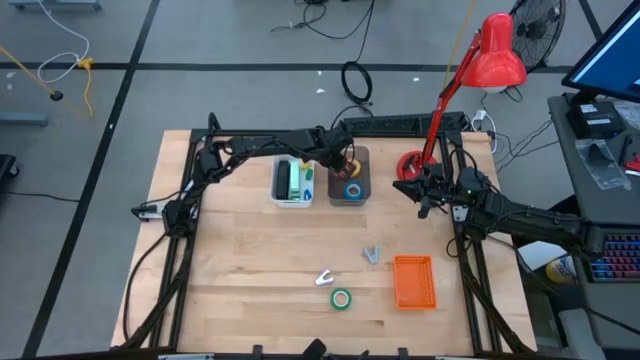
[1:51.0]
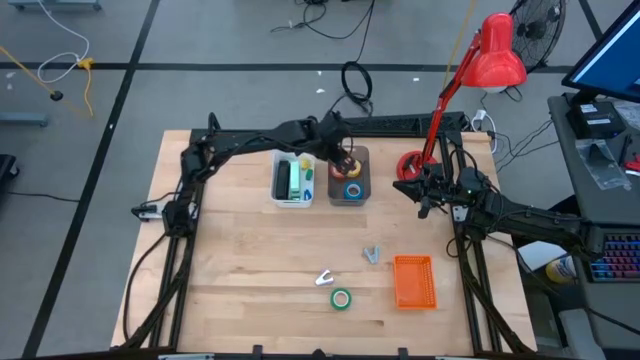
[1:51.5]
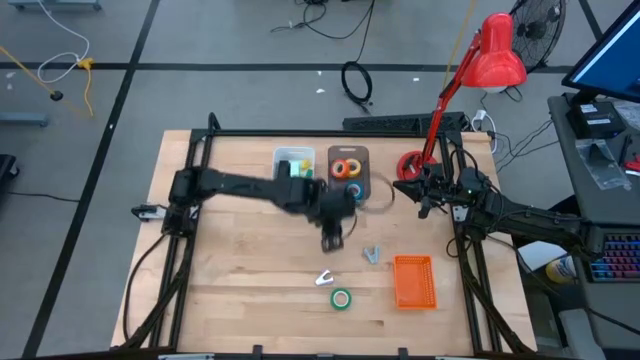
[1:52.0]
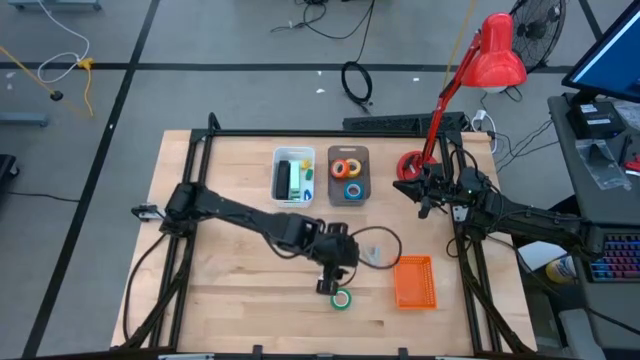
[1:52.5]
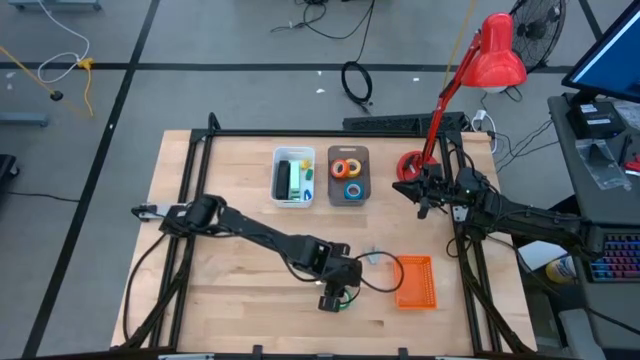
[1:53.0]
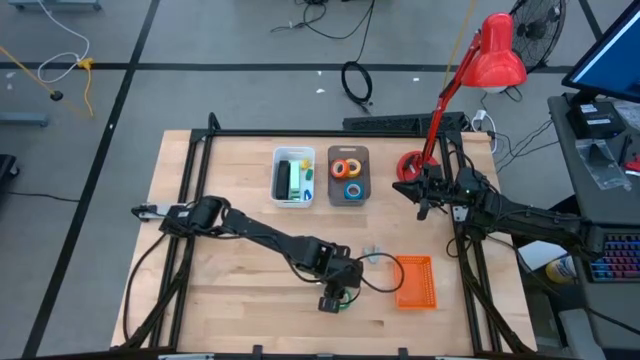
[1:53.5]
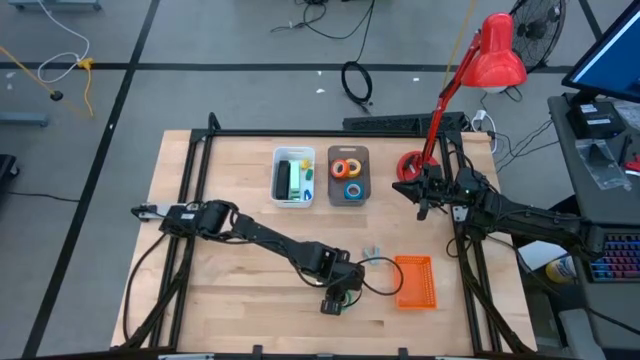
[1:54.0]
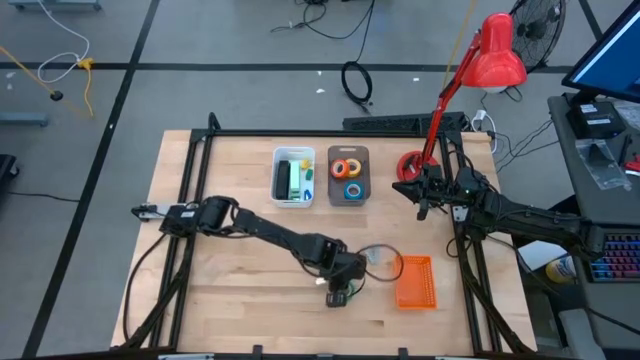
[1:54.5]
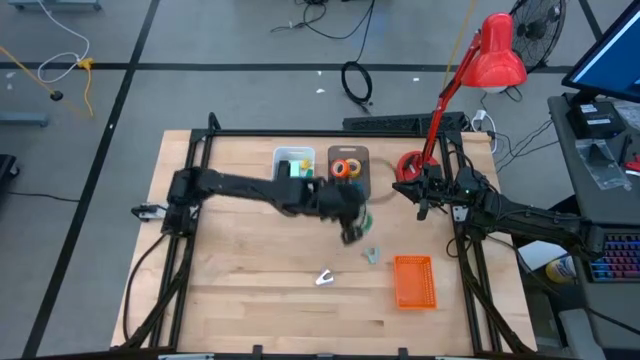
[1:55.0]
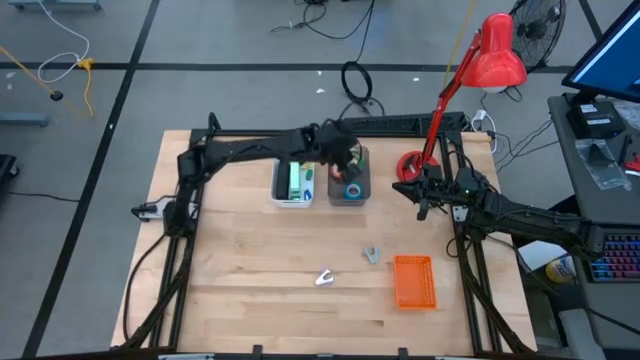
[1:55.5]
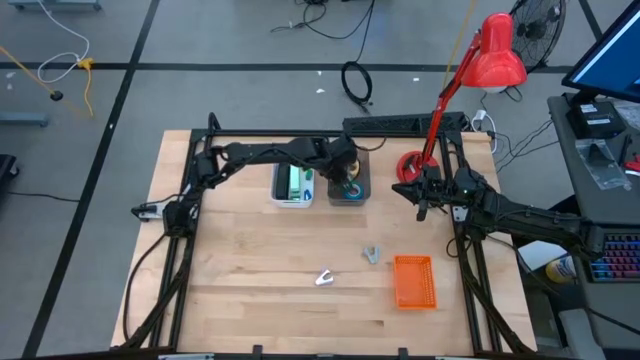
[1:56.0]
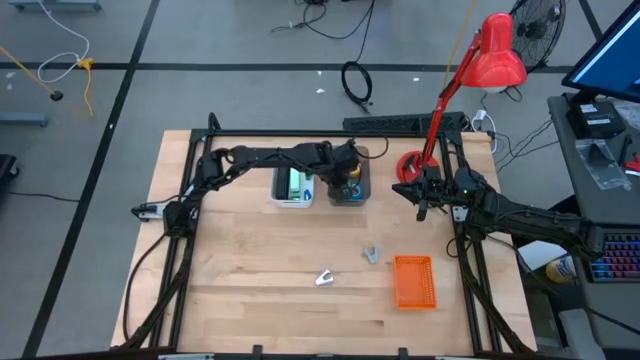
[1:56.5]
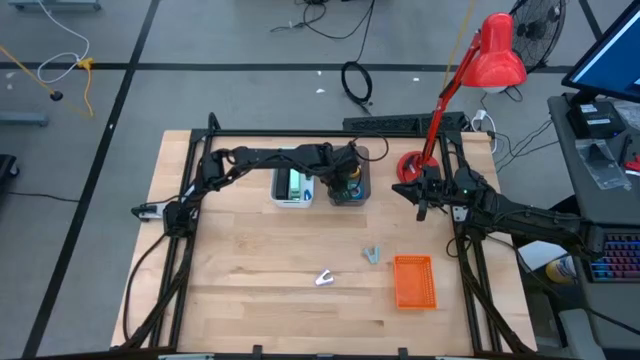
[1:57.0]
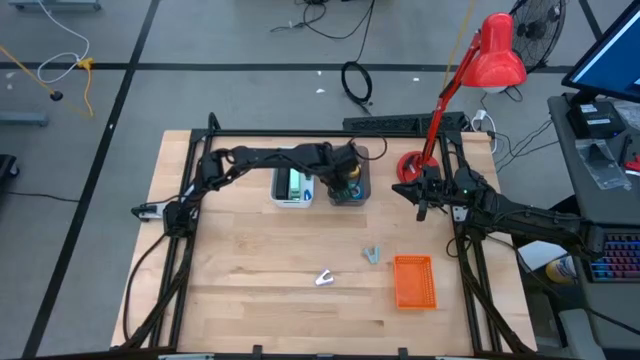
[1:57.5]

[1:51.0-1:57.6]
Task: Pick and place Stapler, Stapler remover, tape
Put the green tape into the black bin

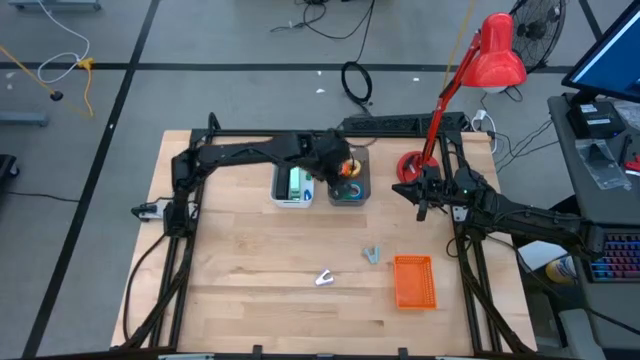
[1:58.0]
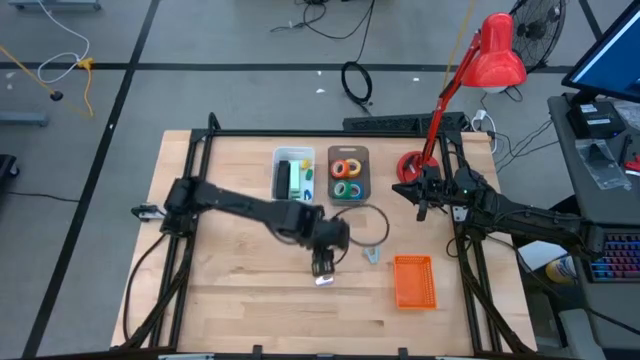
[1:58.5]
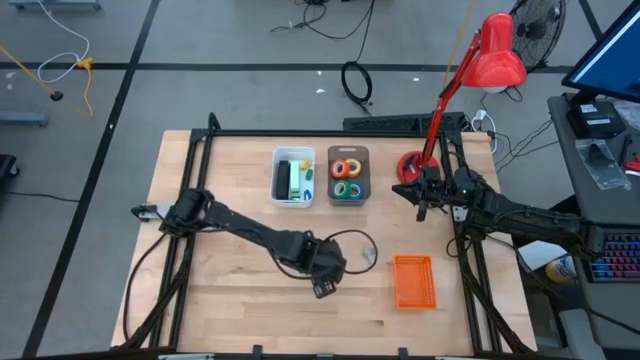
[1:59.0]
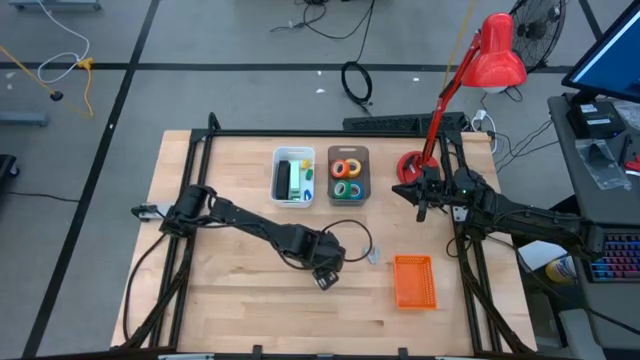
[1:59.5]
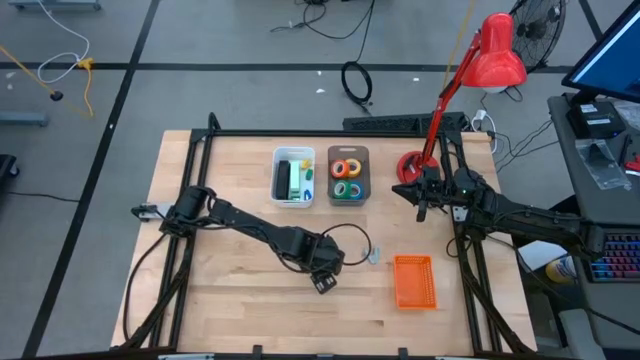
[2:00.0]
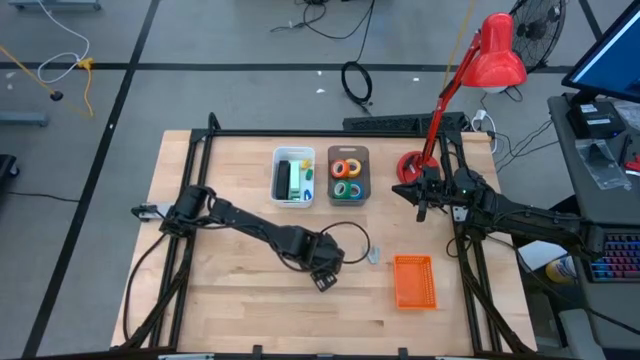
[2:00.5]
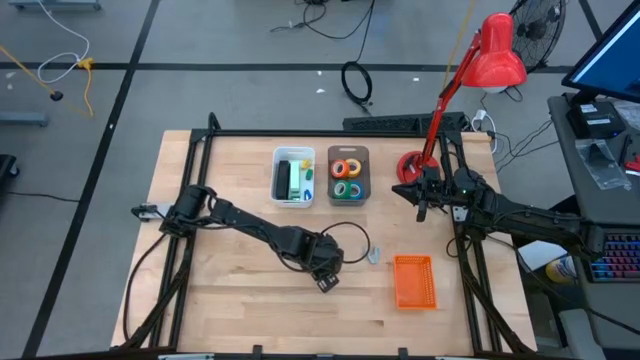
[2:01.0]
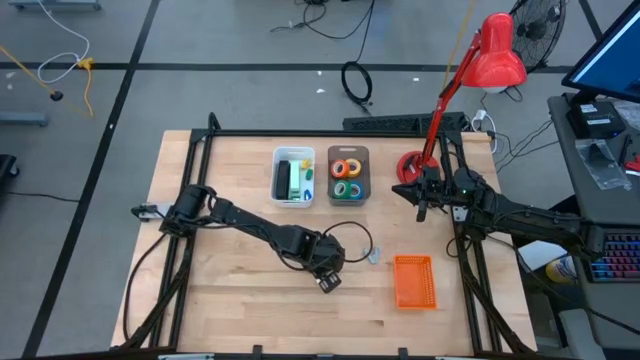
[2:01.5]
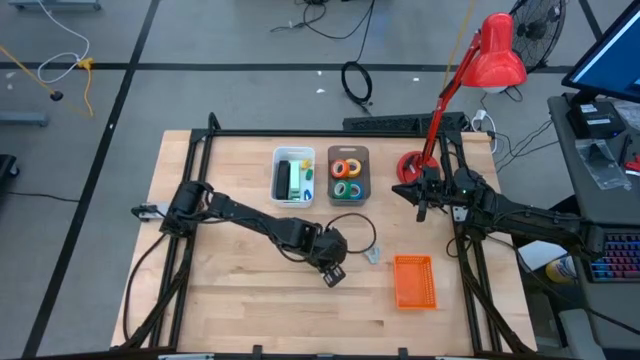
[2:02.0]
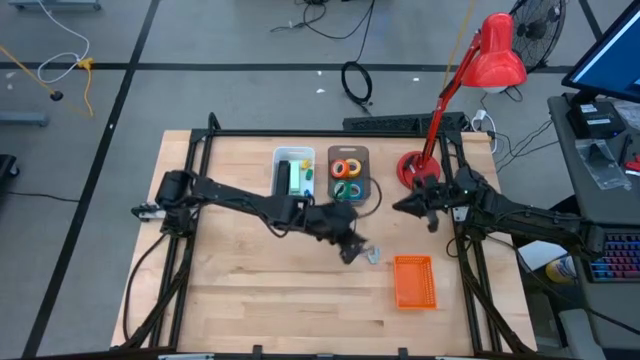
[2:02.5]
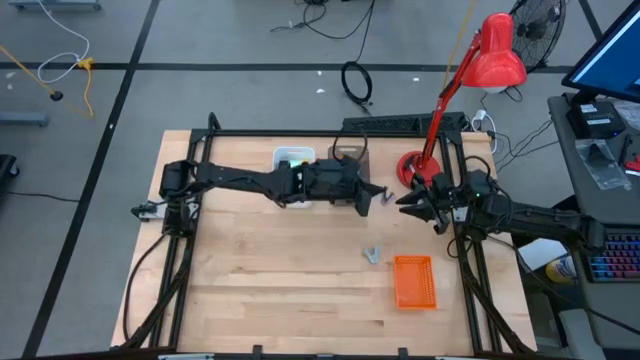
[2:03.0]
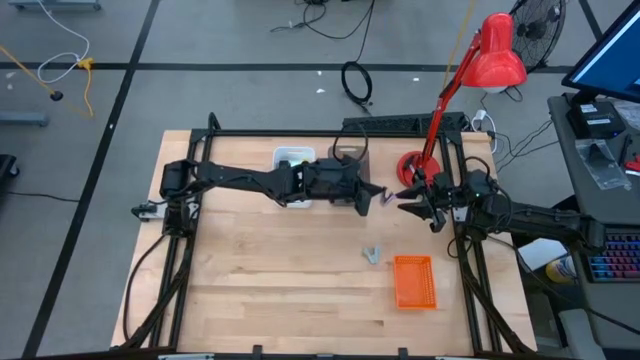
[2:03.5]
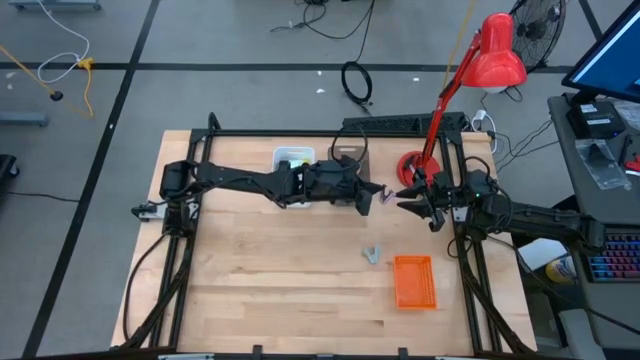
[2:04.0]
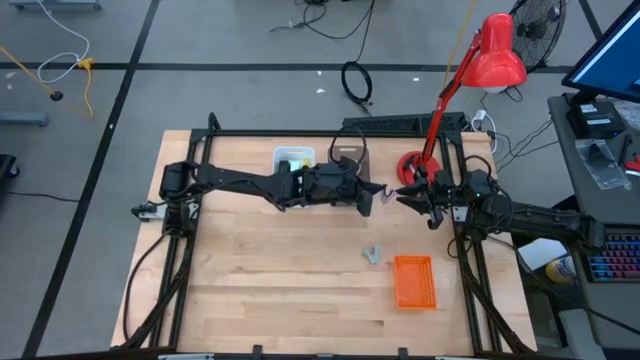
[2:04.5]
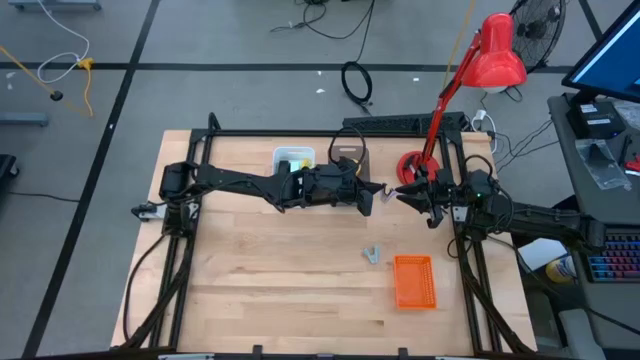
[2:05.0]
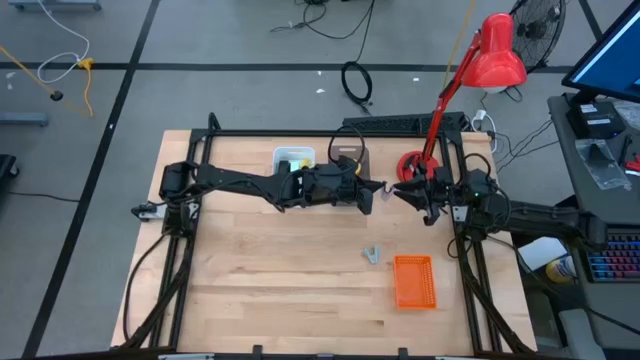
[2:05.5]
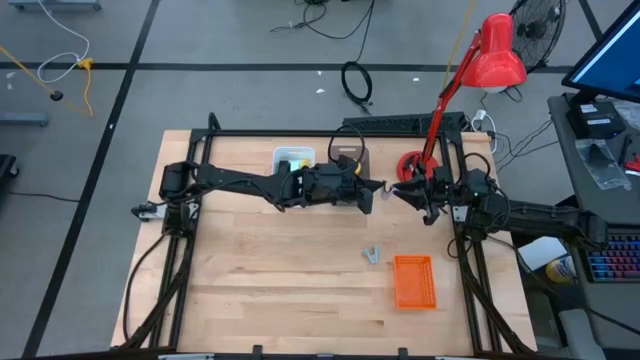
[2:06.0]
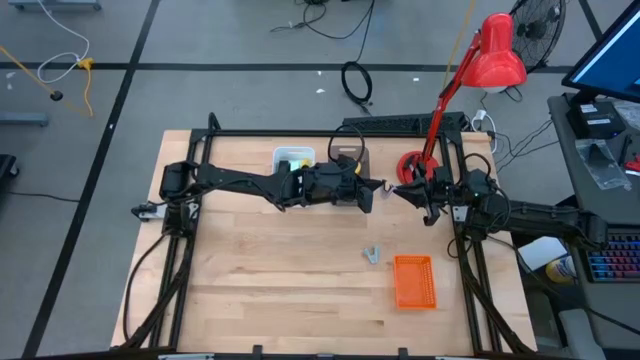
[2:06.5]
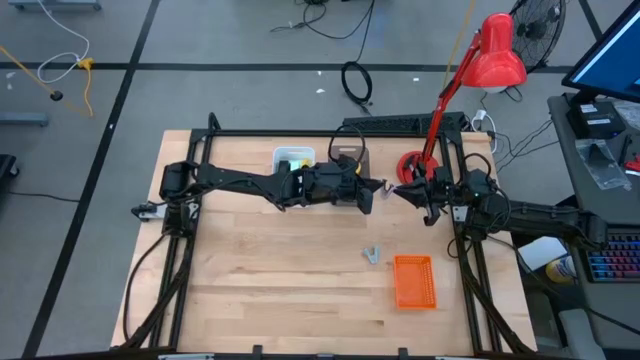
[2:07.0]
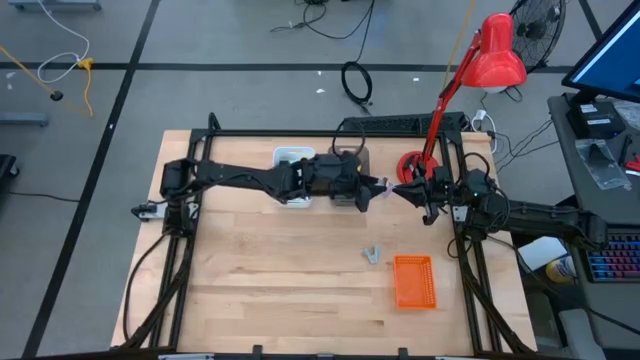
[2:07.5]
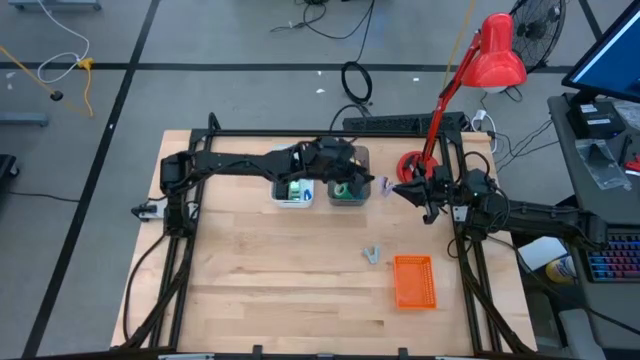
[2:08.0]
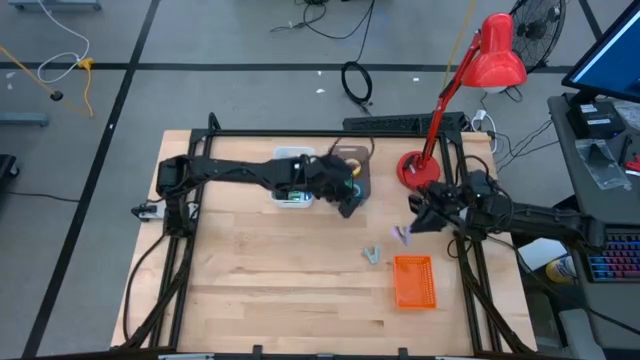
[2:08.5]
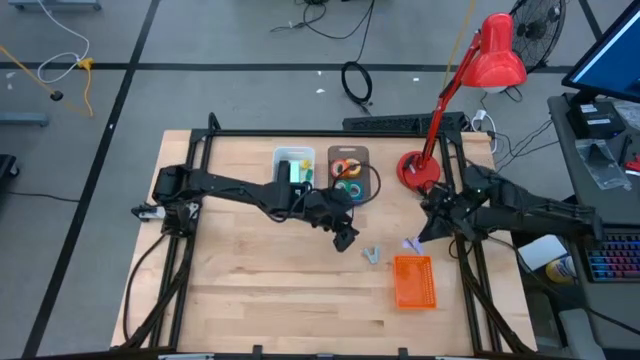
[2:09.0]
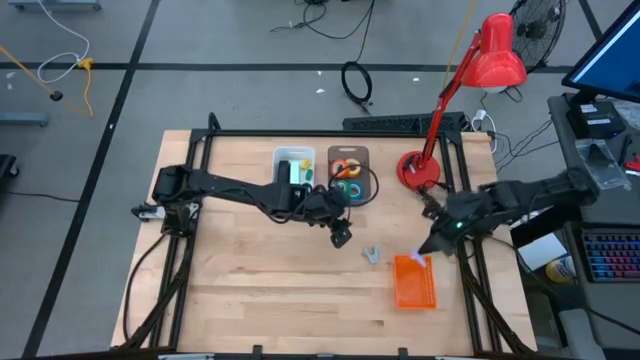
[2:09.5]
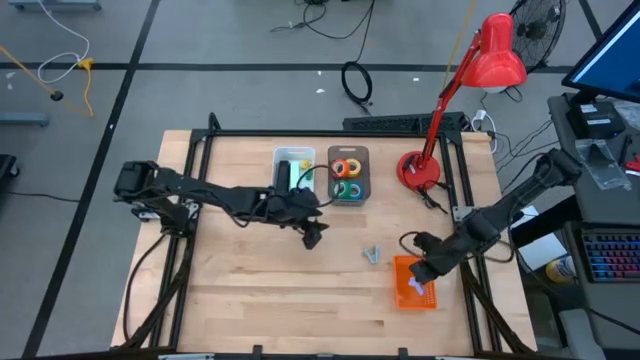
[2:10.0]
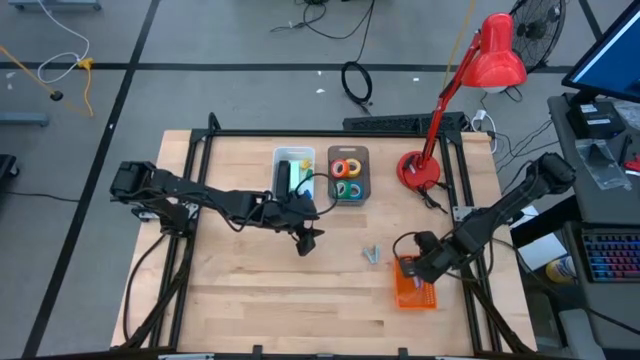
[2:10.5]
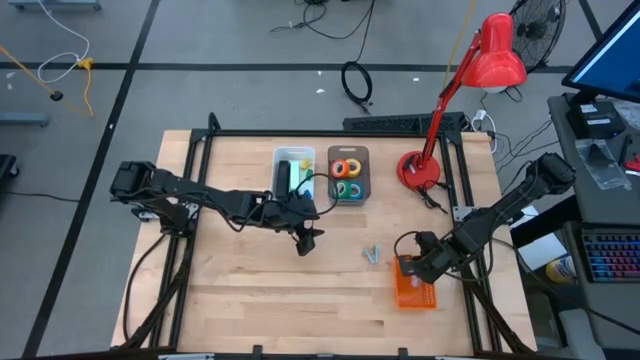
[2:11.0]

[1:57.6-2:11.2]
Put the purple staple remover into the orange bin
